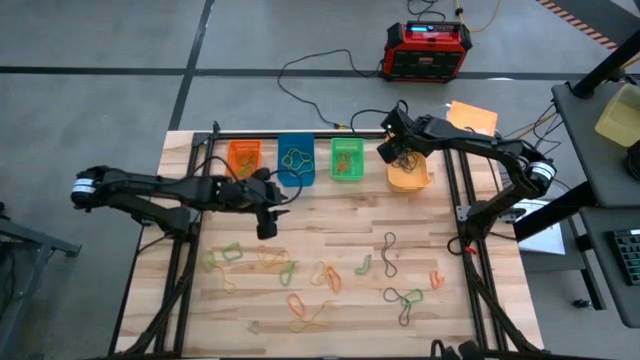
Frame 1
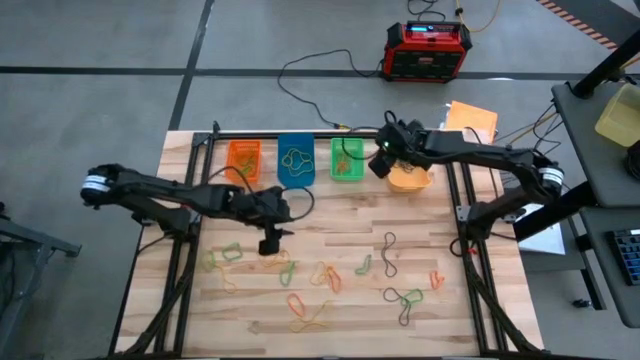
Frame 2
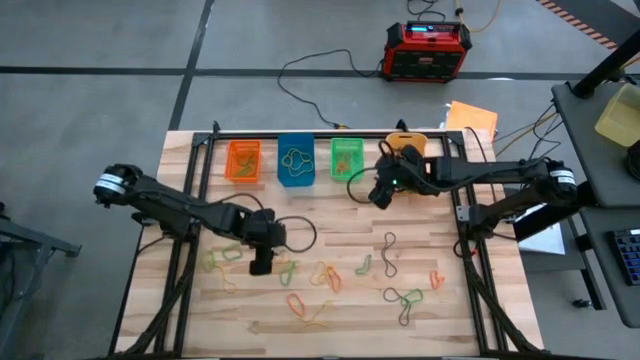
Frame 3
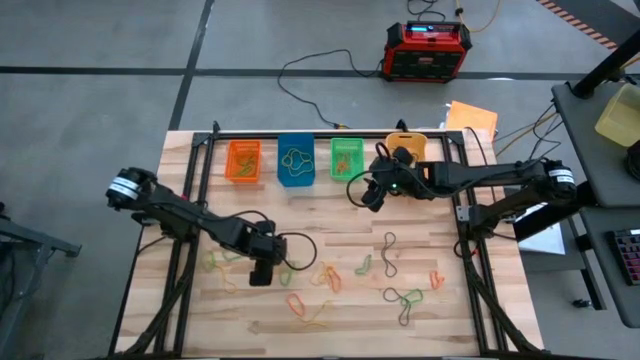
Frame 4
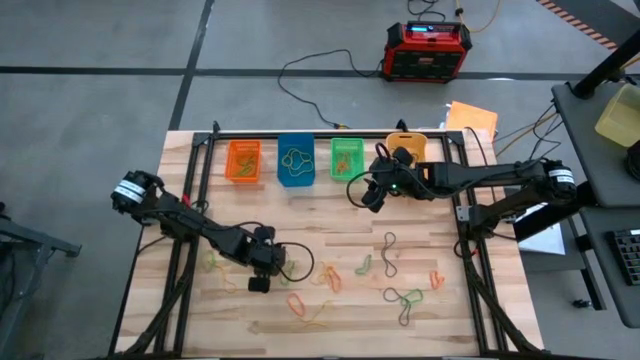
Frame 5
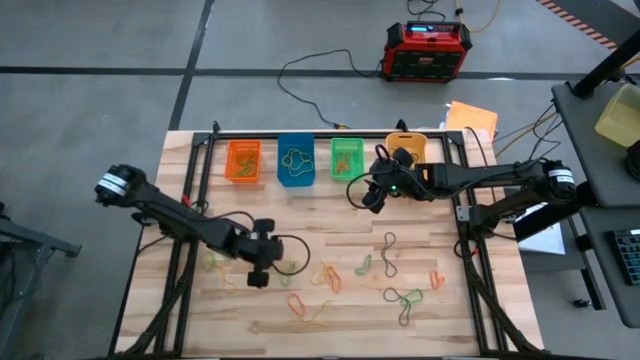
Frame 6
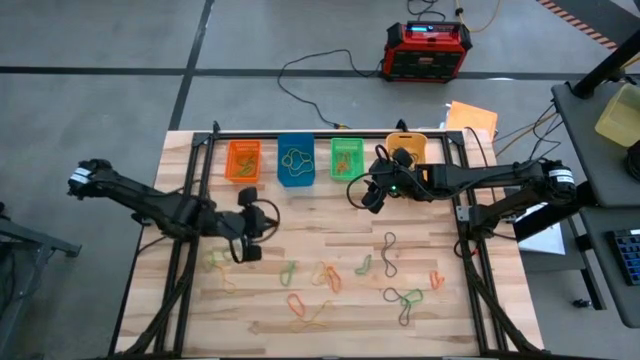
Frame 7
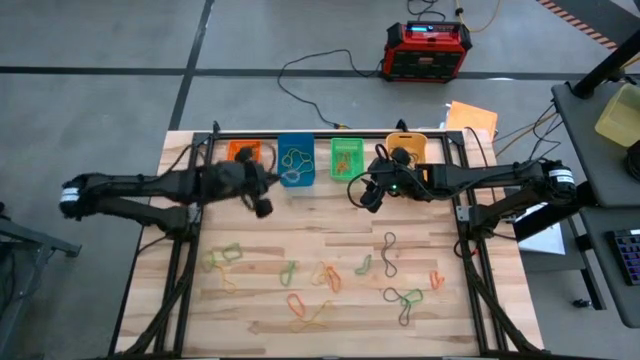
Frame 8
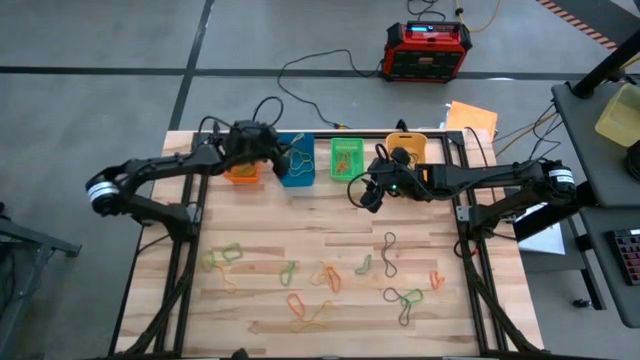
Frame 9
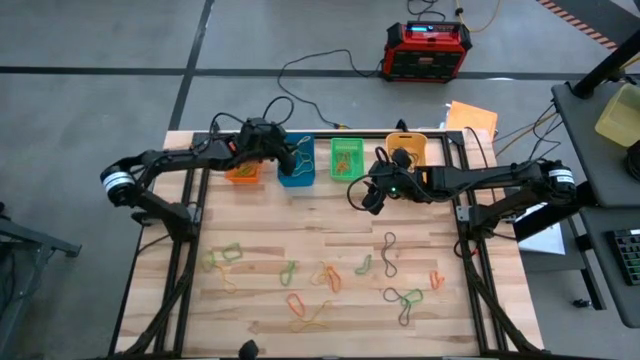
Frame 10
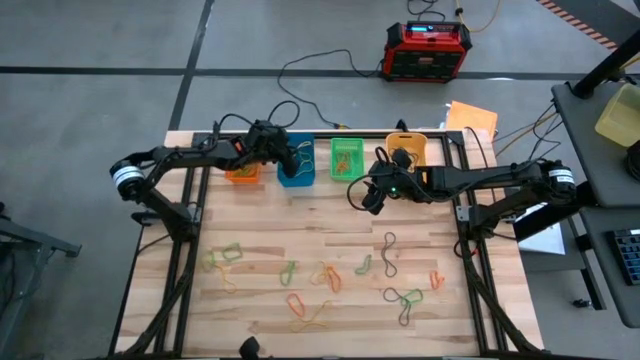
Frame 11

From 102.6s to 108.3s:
Task: Sort rubber bands into baskets
Put the yellow rubber band into the blue bin

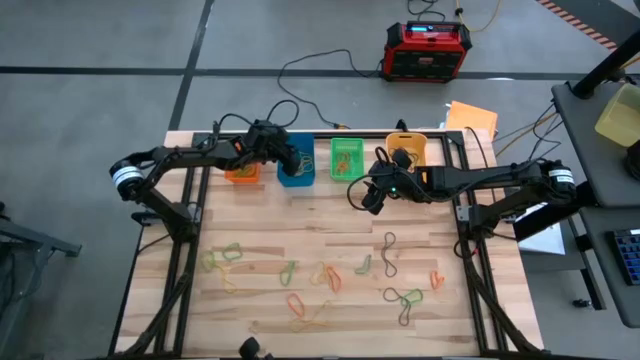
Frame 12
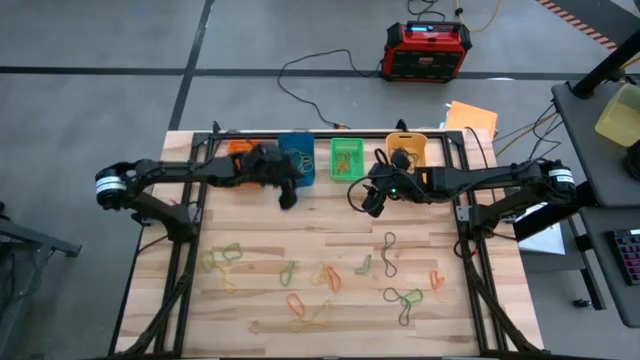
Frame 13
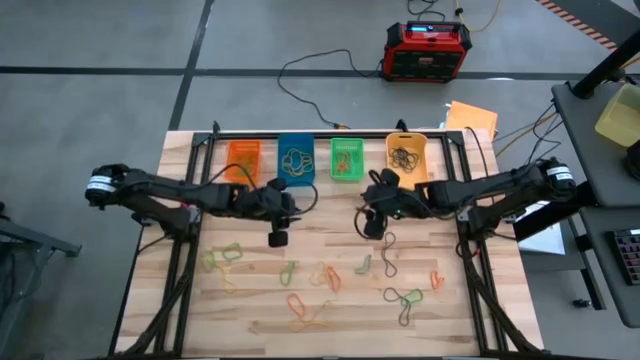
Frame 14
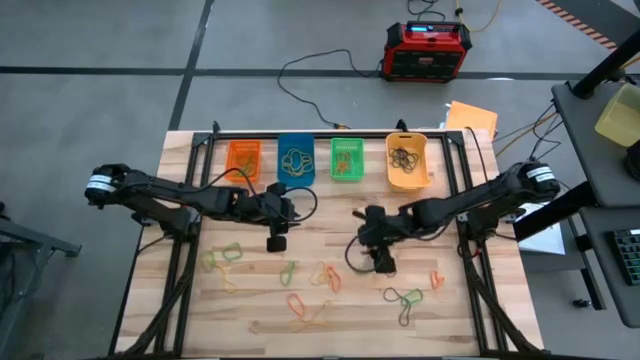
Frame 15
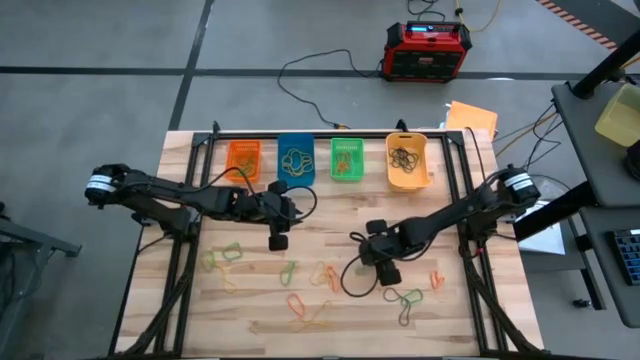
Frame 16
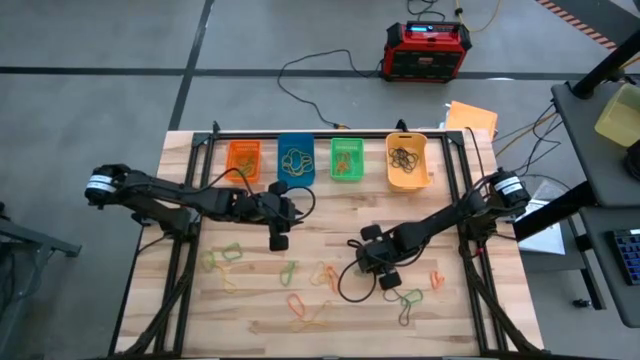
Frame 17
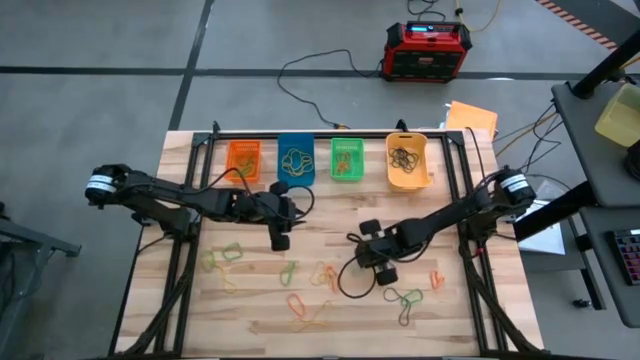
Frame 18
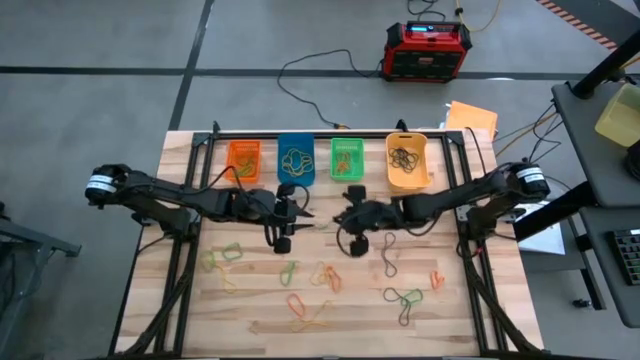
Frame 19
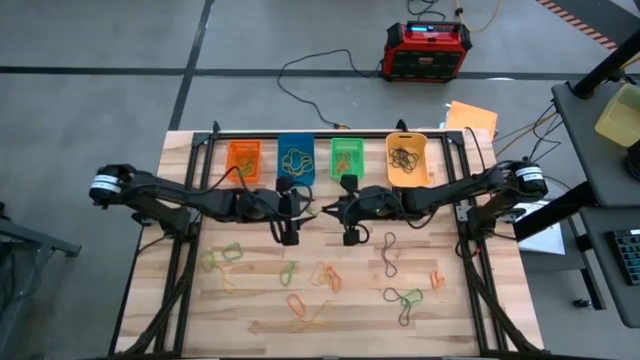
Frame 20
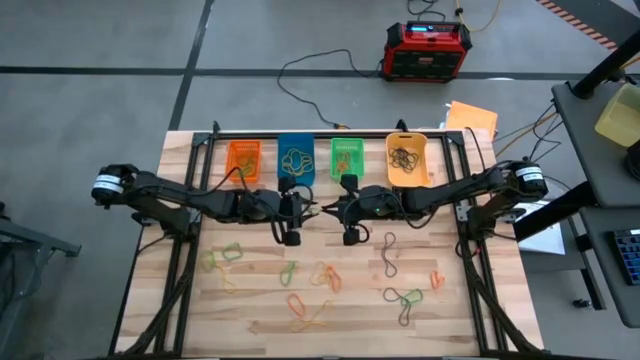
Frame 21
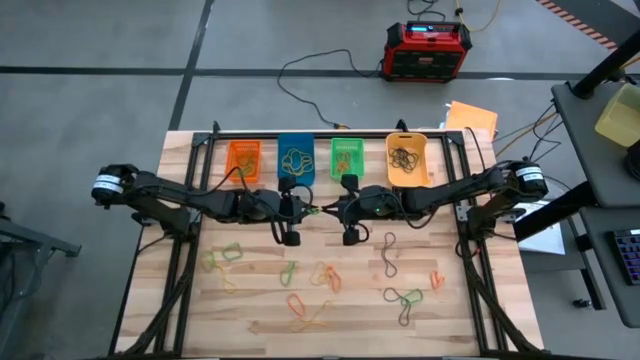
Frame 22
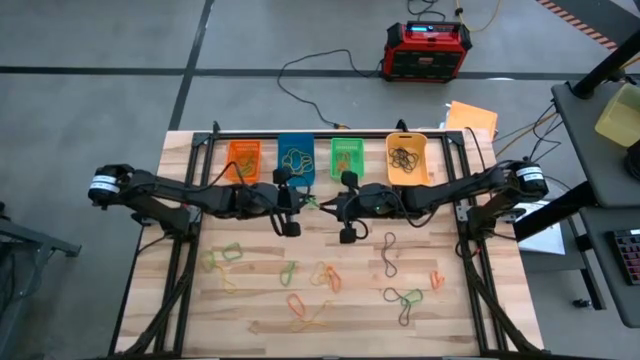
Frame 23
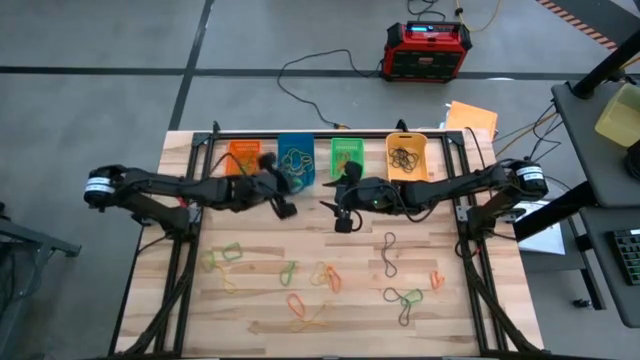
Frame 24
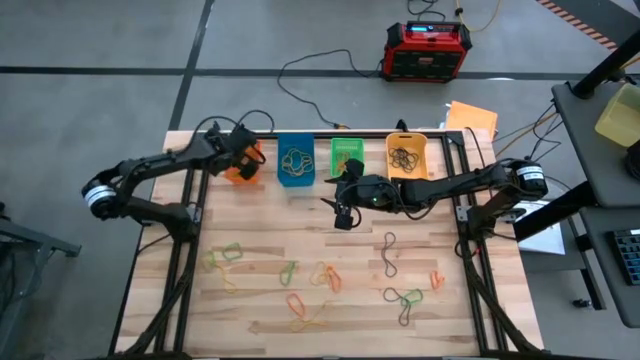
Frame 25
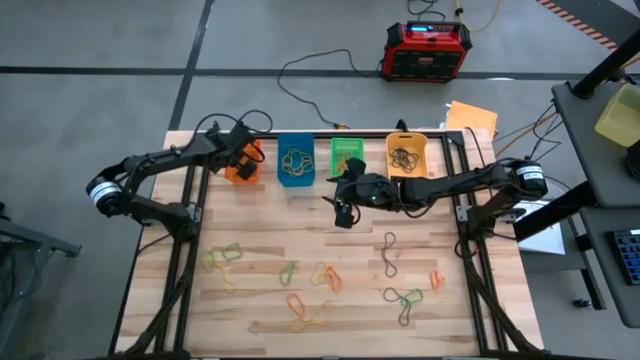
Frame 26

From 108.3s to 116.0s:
Put the green rubber band into the orange bin

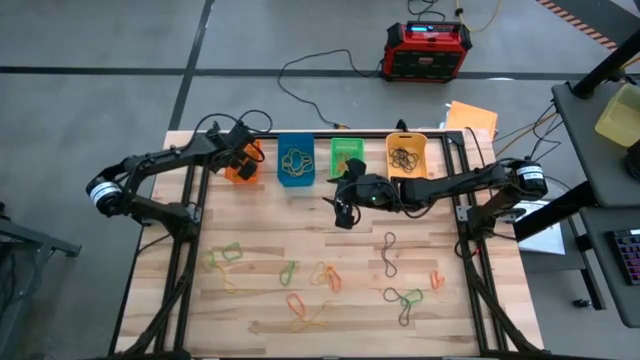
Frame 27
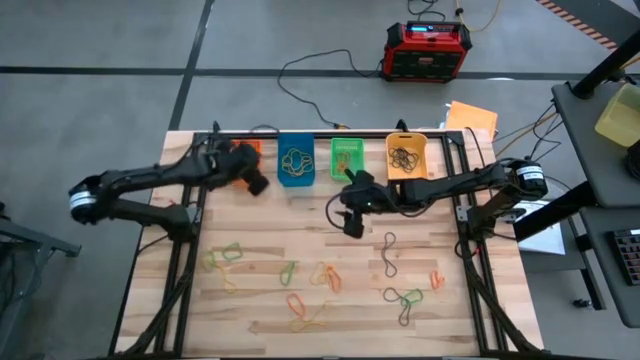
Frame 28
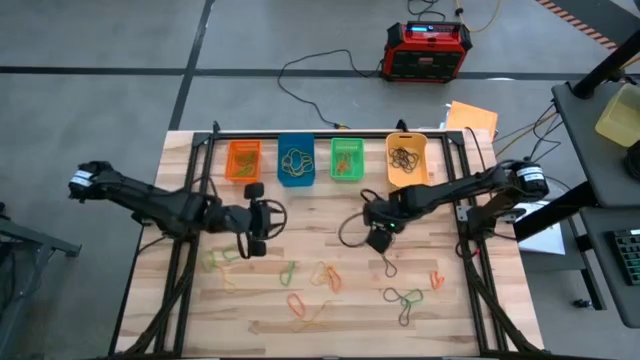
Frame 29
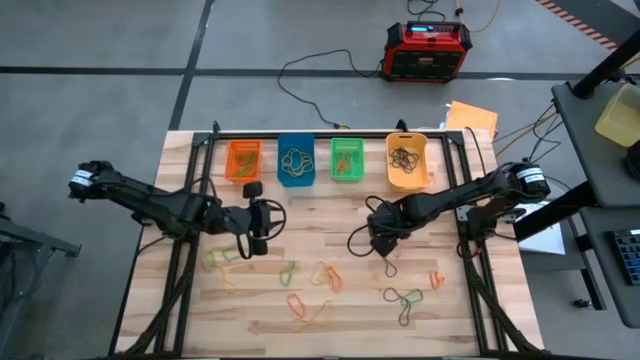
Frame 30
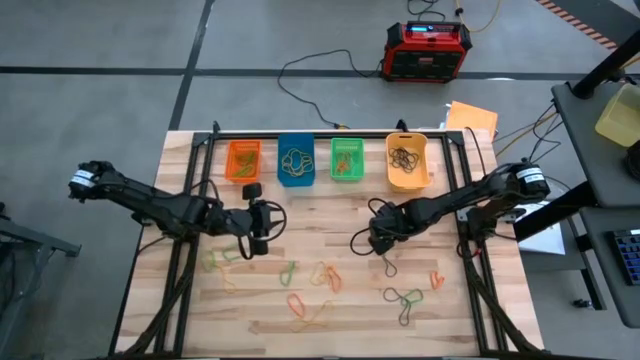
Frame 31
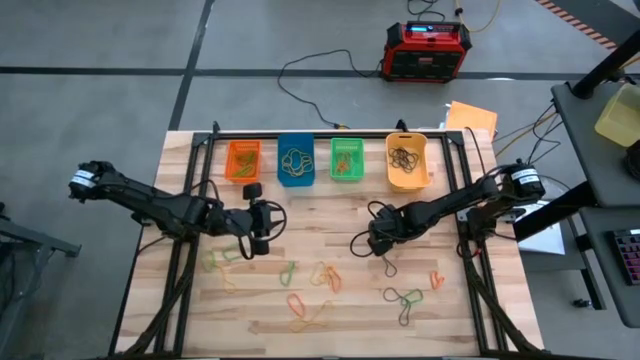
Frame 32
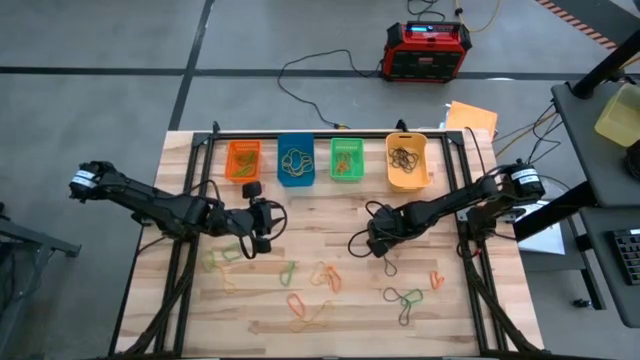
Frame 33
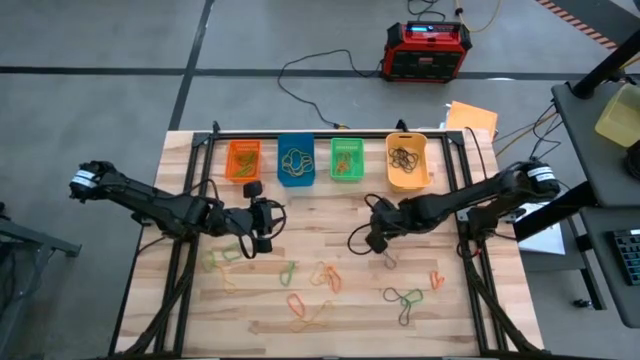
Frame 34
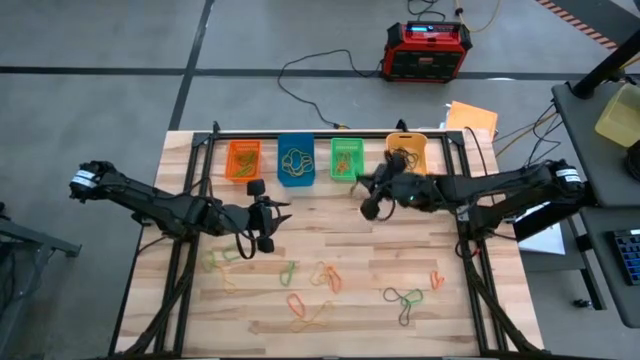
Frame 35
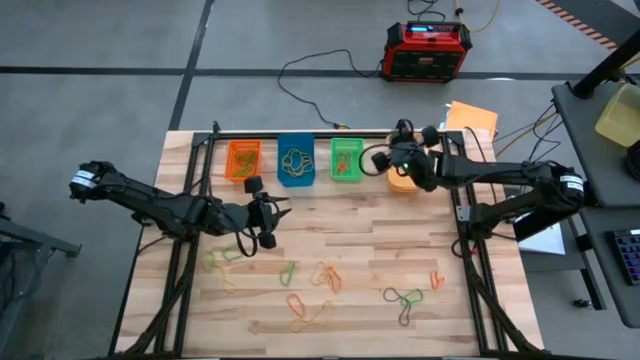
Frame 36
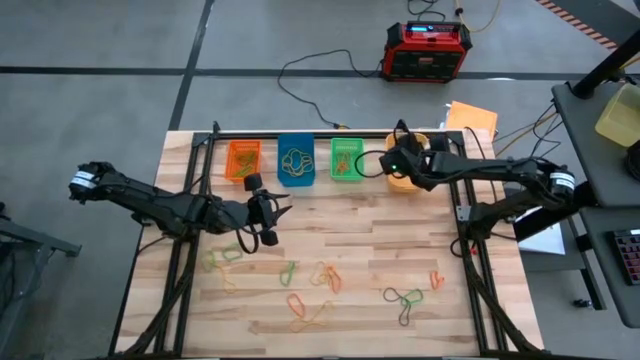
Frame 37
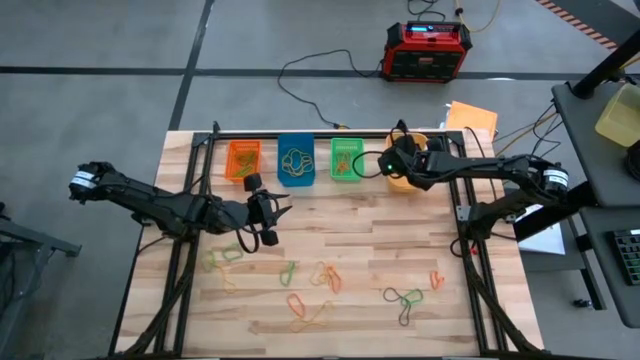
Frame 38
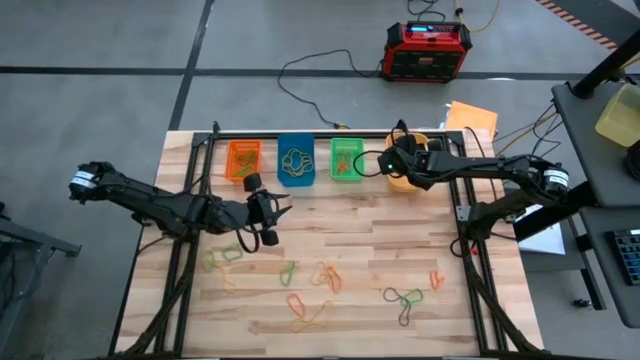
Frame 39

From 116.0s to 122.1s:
Put the purple rubber band into the light orange bin

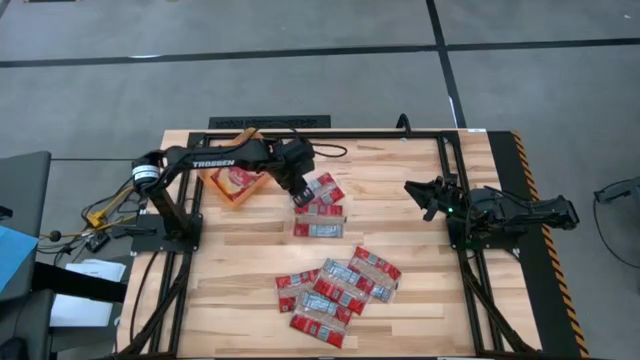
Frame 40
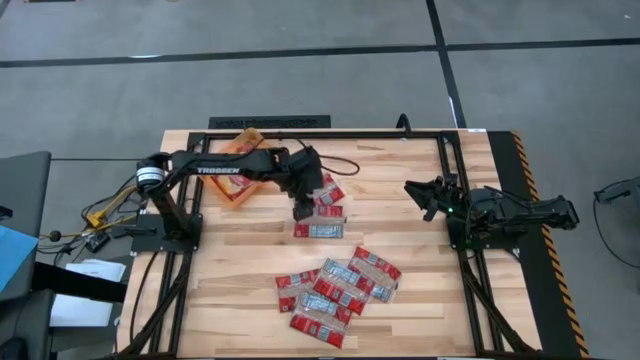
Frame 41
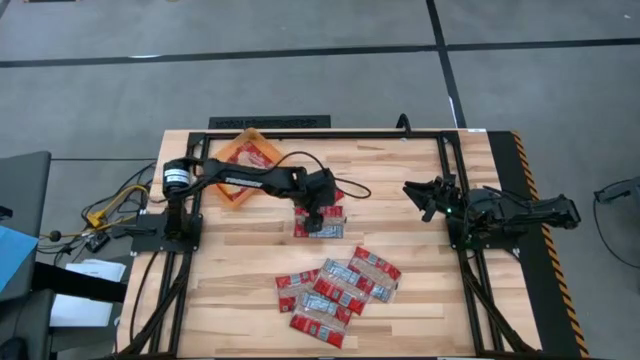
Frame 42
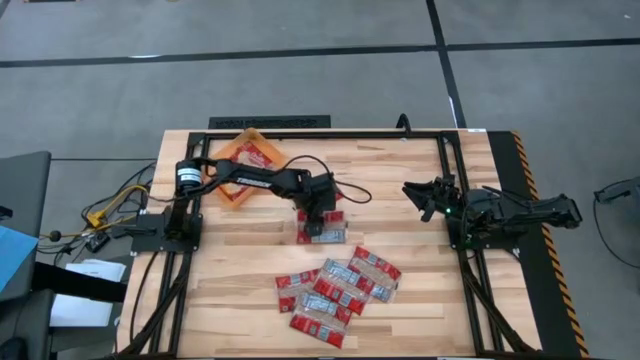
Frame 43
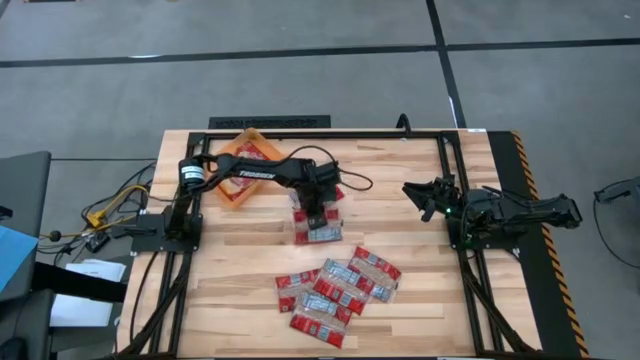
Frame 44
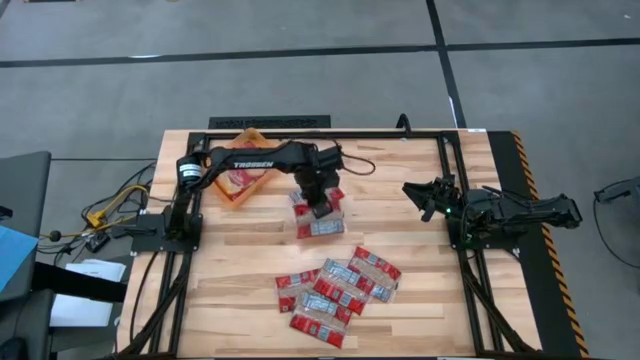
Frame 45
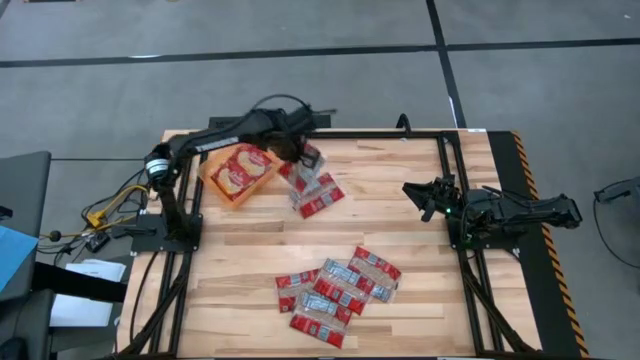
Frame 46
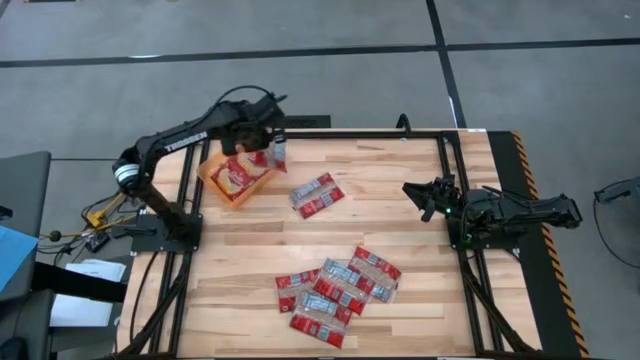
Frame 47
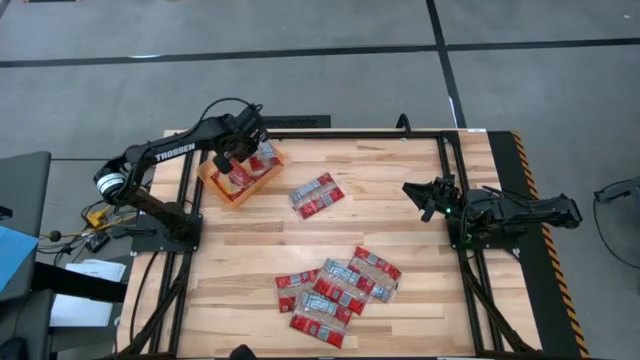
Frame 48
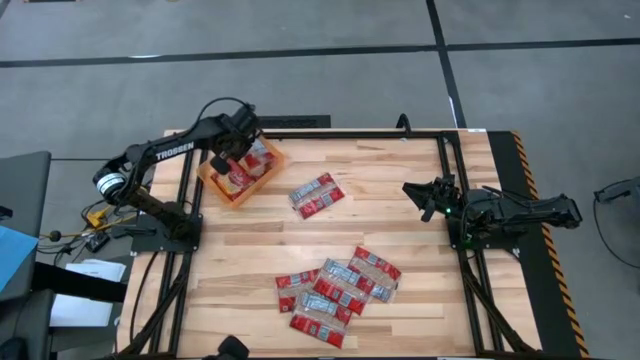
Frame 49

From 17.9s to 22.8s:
Task: Sort popcorn bags into baskets
Put the red popcorn pack into the orange bin
